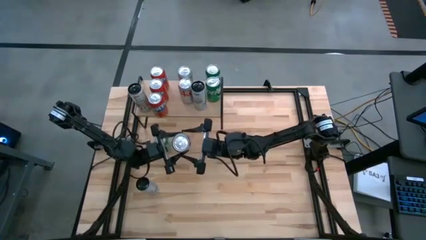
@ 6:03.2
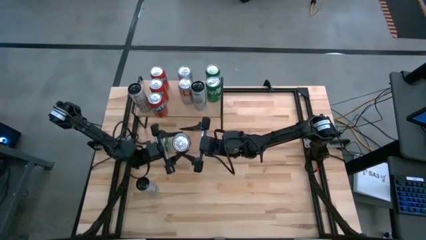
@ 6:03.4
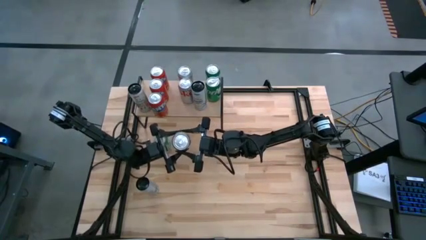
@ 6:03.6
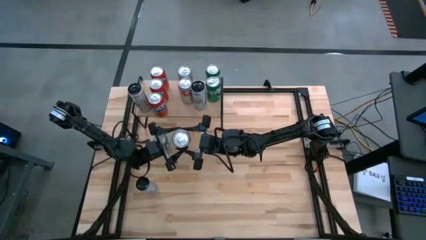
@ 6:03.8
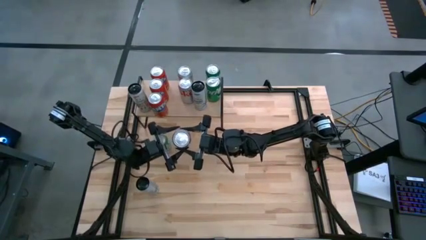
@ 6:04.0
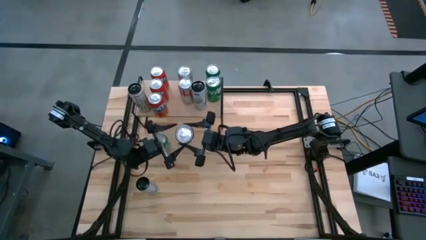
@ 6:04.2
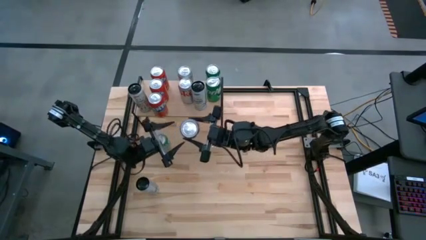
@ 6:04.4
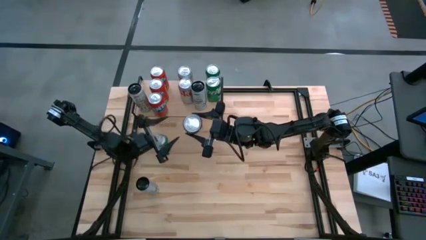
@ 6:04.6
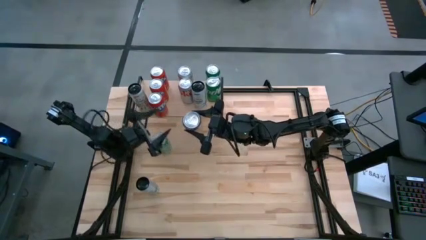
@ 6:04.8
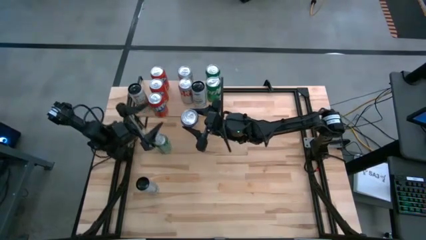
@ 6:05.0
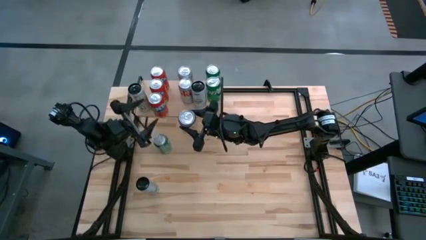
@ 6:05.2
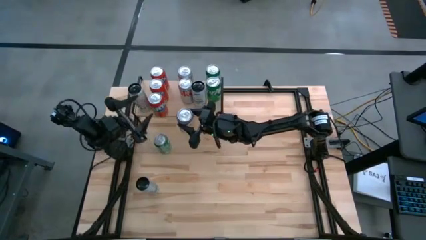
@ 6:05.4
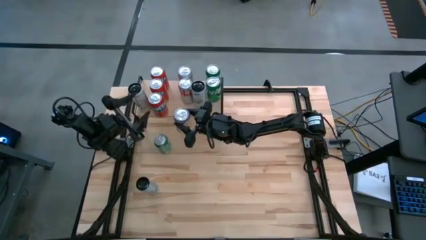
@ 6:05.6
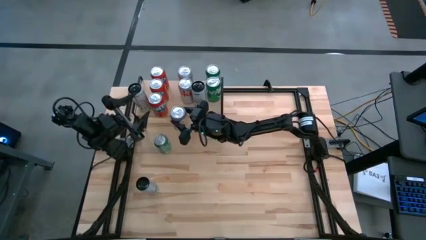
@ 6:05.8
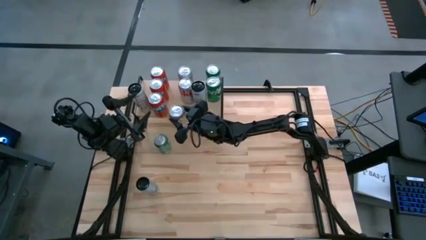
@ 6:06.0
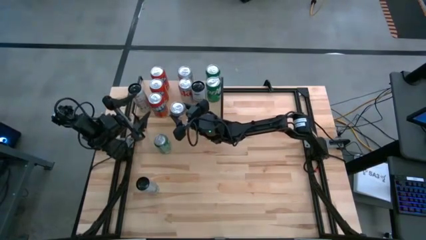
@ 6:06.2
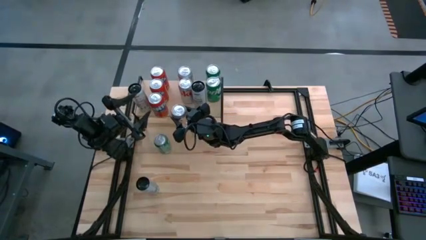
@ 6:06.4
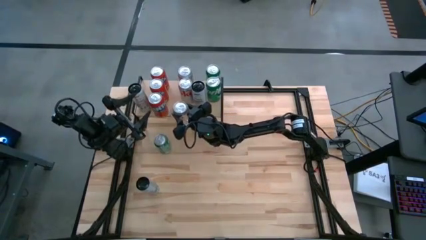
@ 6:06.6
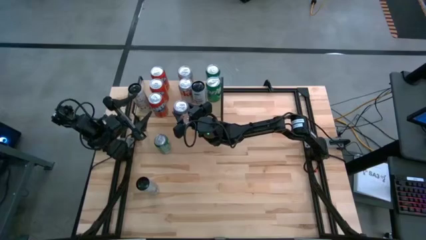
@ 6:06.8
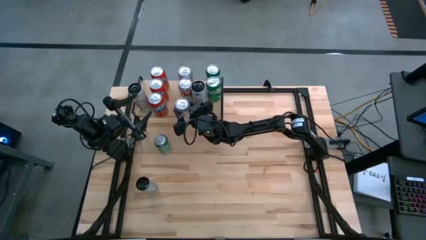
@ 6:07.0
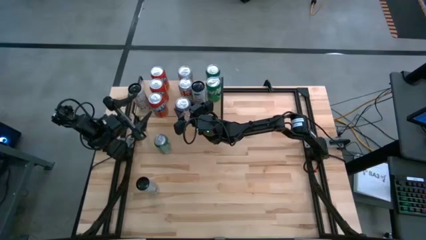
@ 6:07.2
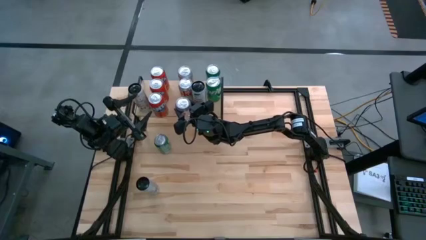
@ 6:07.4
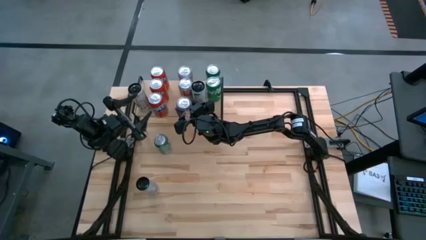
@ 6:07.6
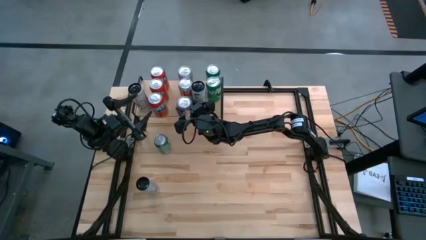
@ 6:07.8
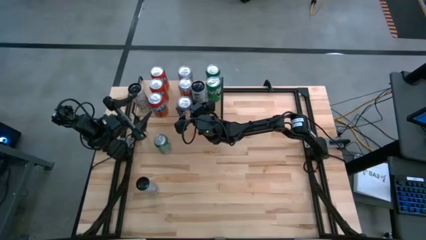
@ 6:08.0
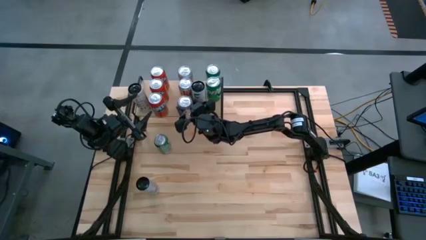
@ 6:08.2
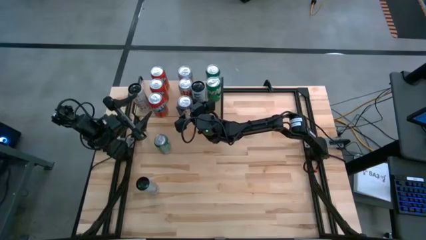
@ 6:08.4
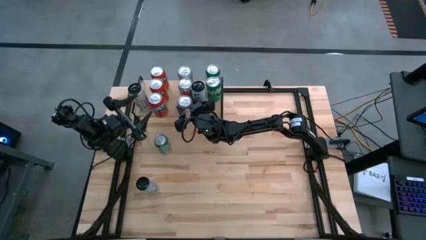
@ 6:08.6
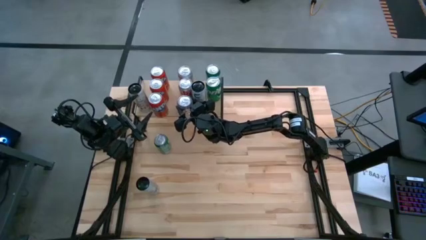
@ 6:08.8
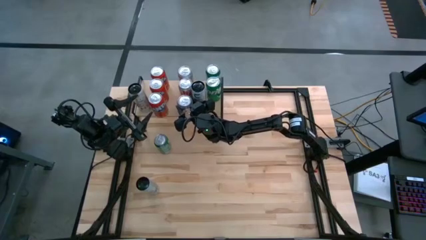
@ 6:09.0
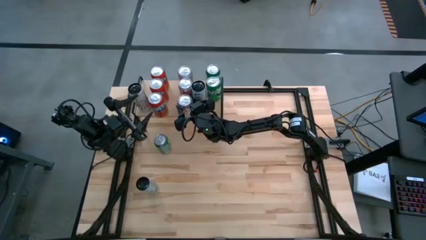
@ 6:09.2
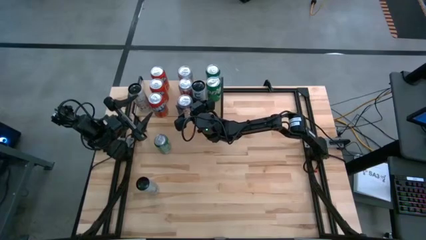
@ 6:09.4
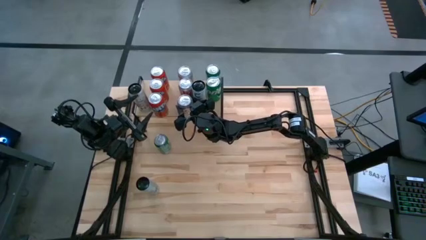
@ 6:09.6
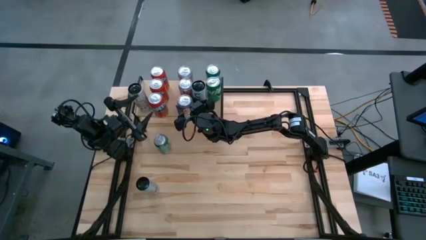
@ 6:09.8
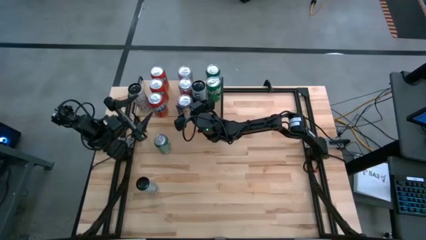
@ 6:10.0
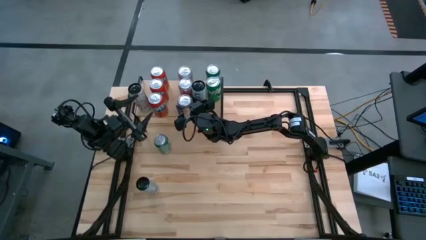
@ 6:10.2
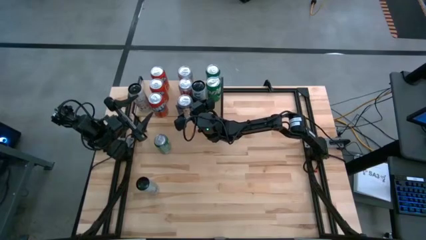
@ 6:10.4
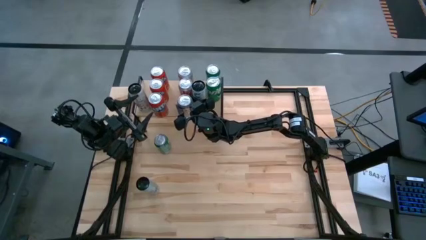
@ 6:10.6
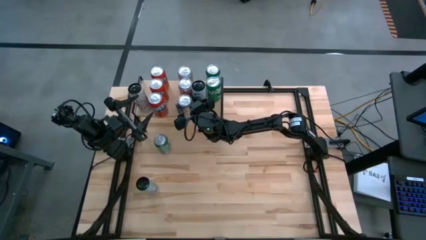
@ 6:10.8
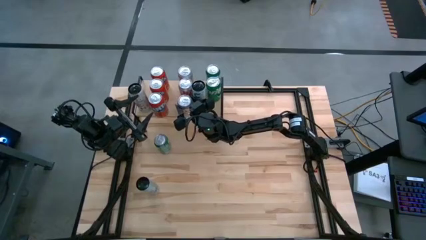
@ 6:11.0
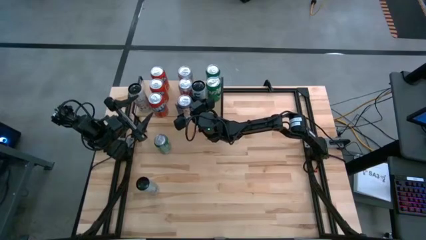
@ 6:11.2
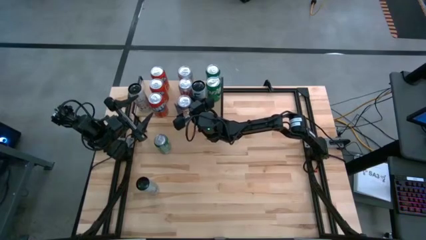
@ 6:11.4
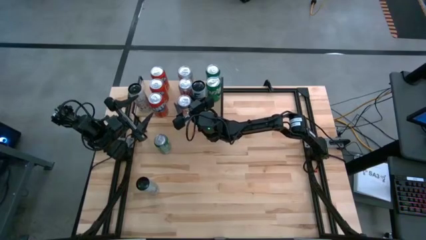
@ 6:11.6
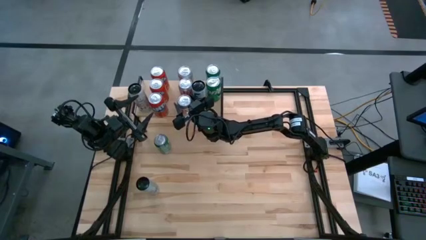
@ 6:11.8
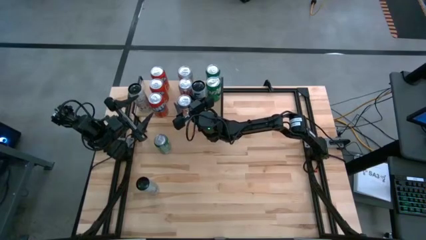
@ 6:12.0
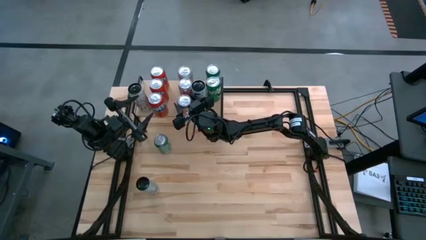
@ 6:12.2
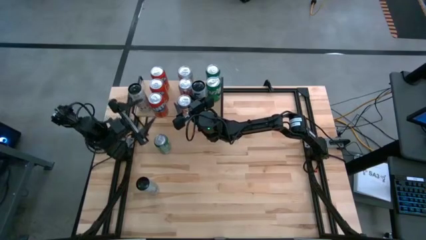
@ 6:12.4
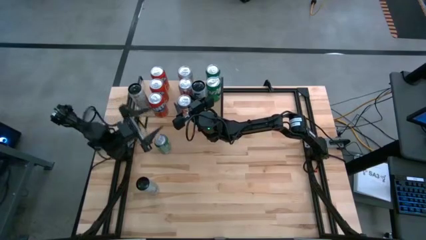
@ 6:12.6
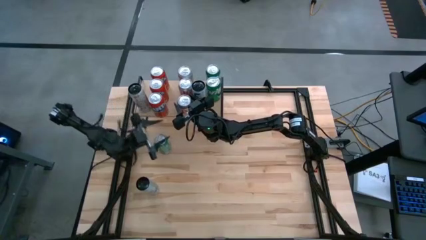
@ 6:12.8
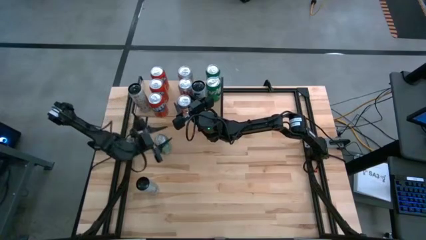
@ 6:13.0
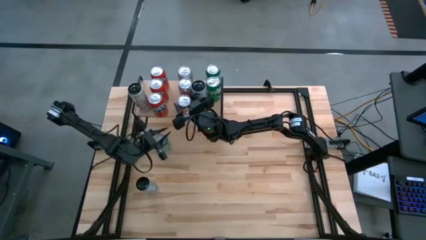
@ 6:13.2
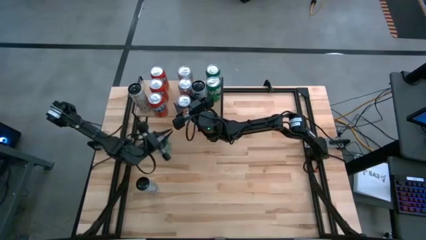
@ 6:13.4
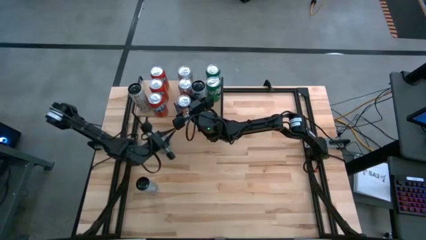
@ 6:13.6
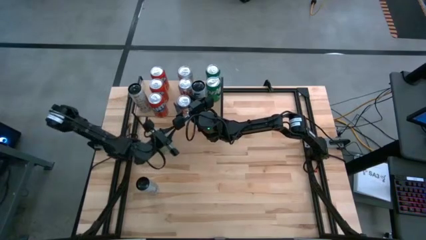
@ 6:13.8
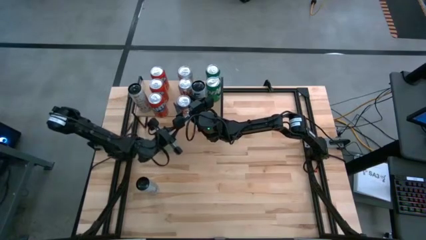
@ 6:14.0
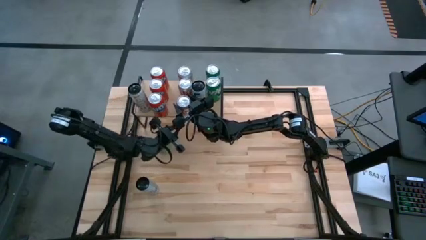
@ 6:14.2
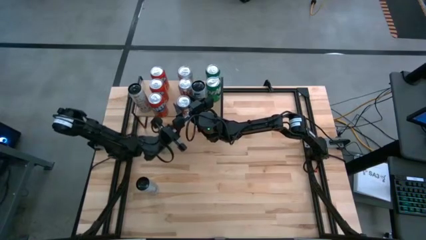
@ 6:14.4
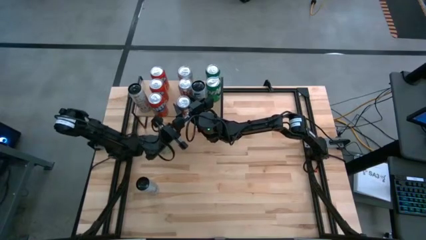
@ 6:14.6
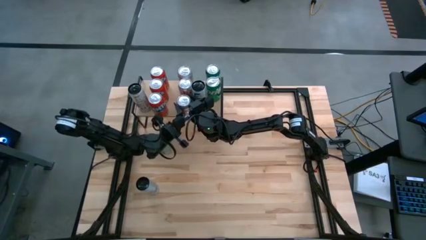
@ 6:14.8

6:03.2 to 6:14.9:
Task: Place canned beverage on shelf
Put the silver soda can aligned with the other silver soda cans on the shelf
